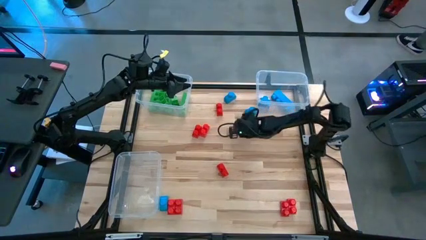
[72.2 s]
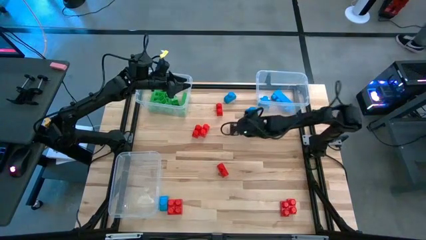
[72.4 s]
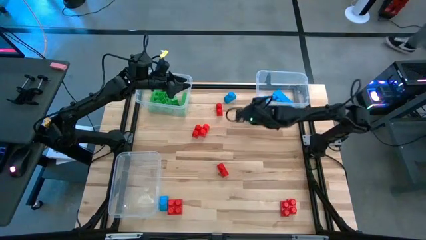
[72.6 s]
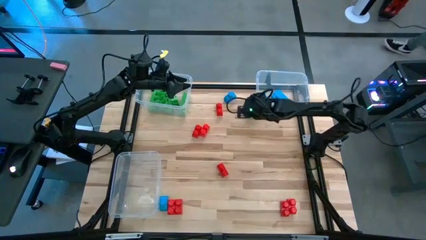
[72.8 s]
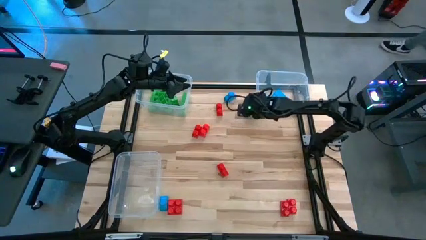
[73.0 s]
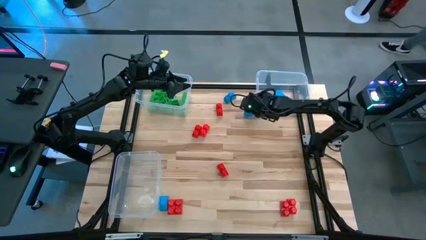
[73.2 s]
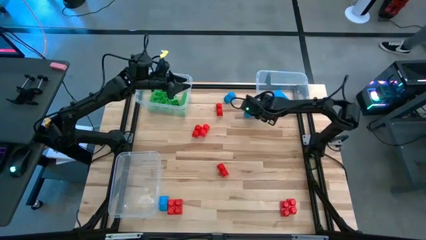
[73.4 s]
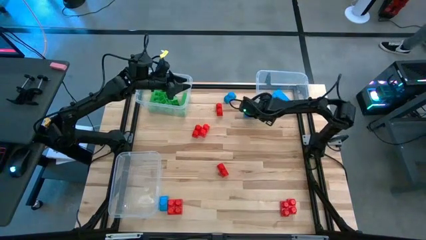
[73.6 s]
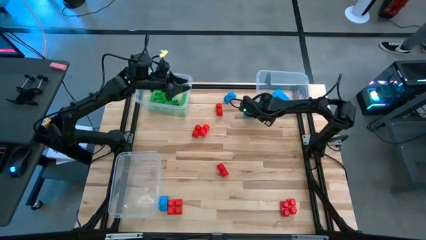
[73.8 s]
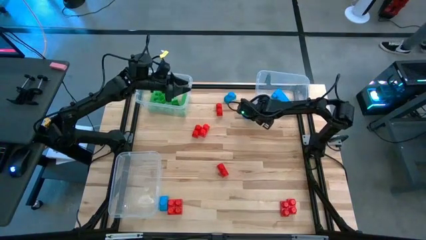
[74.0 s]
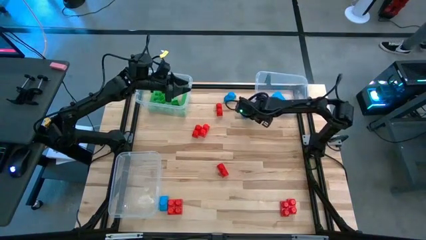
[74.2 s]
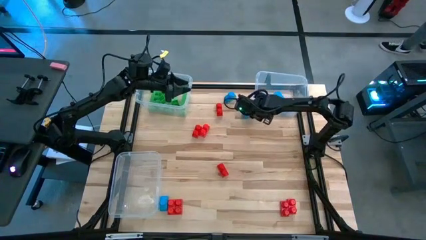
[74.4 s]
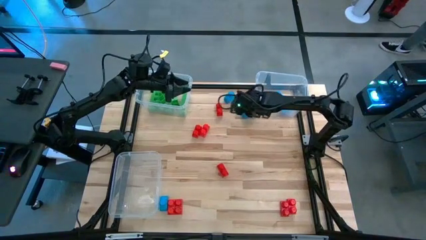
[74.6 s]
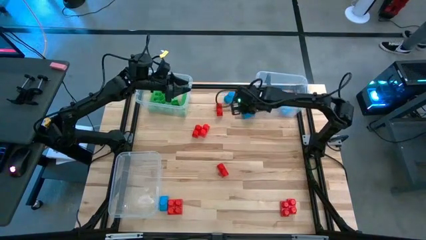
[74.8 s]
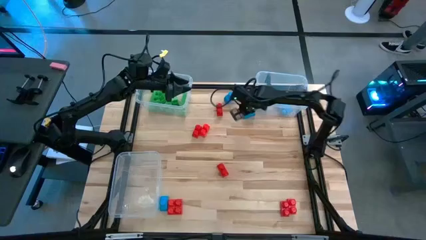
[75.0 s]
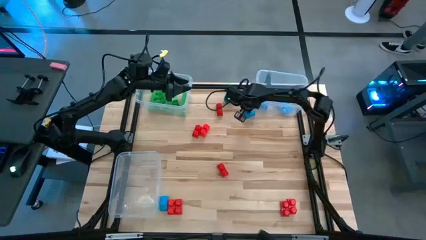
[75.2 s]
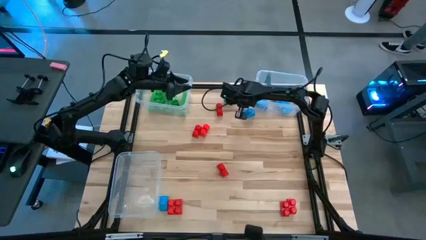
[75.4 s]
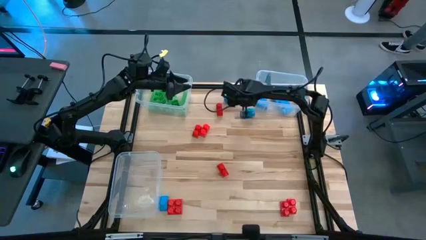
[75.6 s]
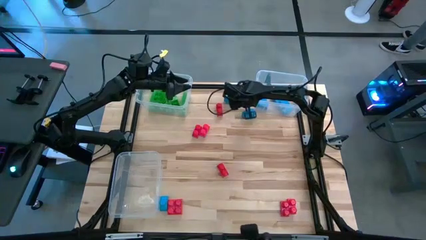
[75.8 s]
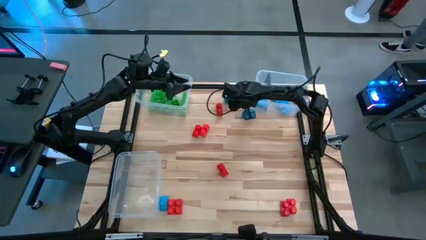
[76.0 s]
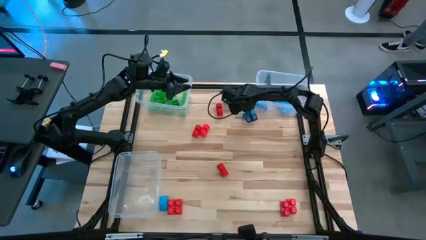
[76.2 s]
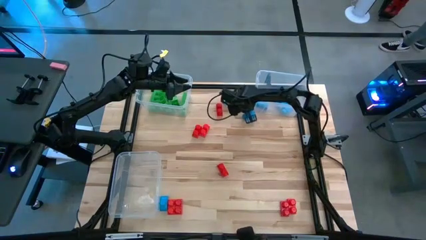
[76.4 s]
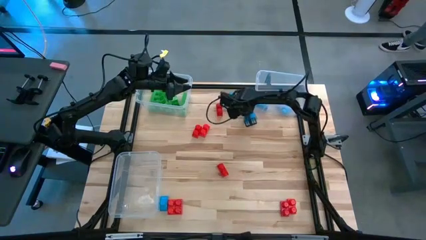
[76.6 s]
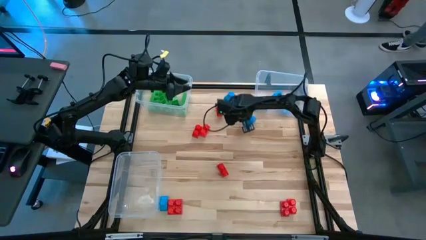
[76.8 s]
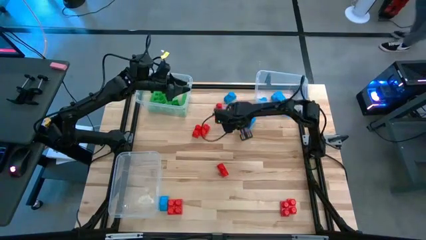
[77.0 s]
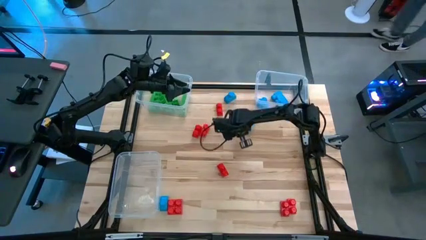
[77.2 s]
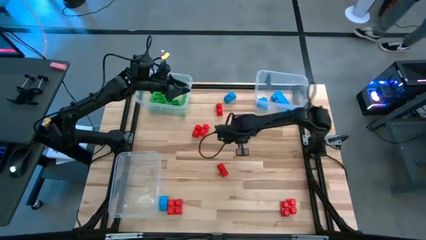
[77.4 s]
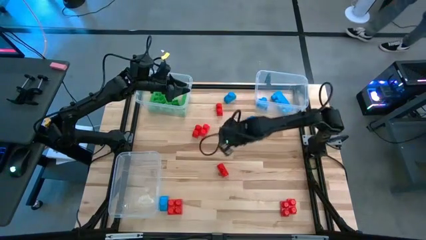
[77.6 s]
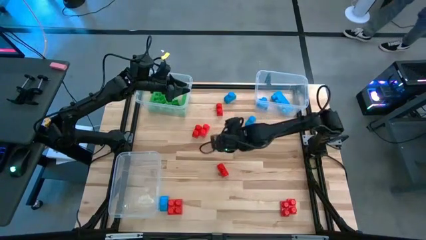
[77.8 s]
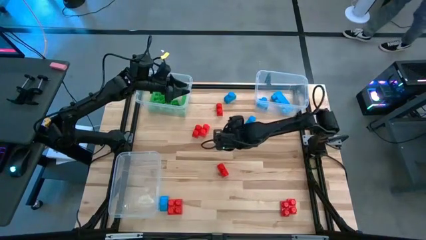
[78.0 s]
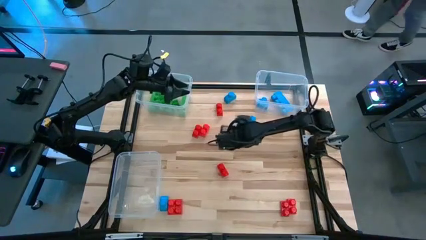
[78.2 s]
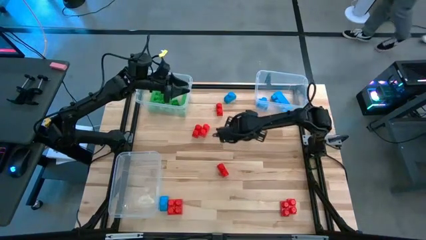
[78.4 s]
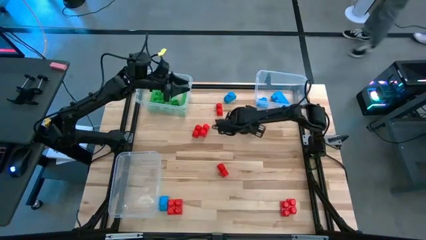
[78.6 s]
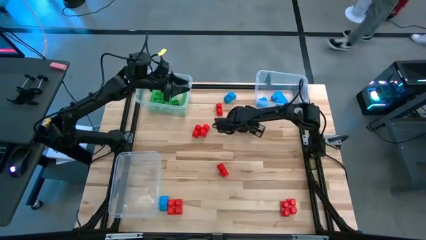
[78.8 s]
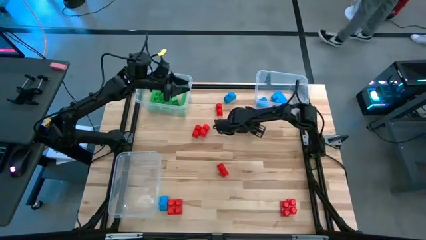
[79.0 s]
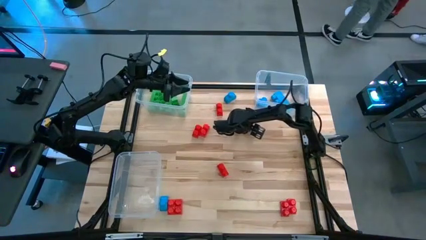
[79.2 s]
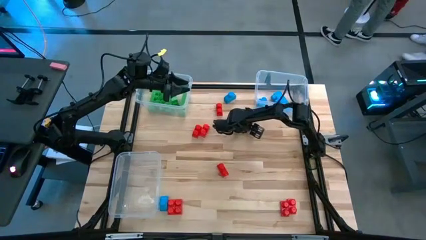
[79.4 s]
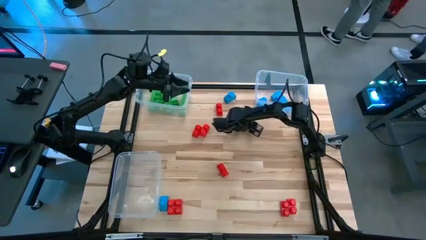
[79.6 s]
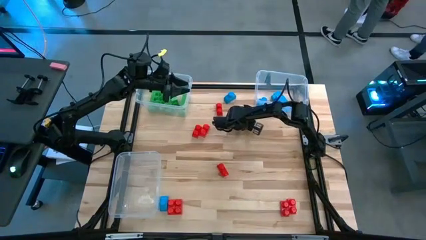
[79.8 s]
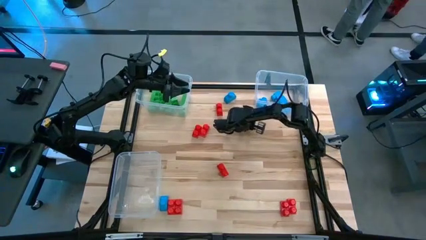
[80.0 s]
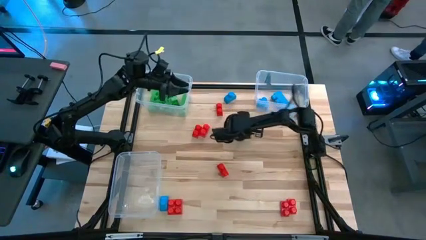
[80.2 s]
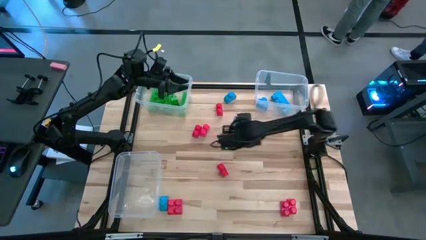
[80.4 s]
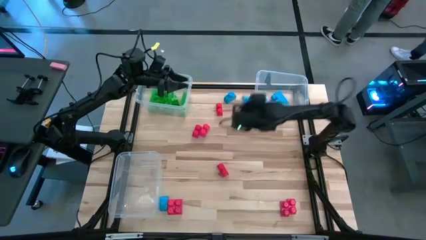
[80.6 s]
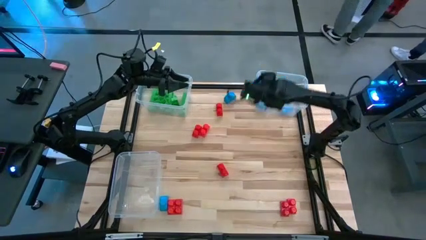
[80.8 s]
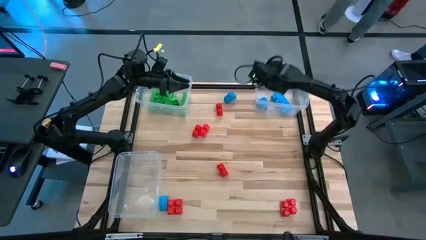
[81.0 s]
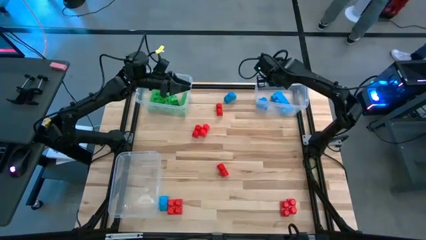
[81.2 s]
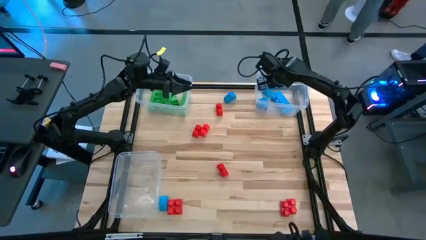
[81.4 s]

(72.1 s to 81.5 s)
Task: Sort blocks
Put the blue game piece into the top right transparent bin

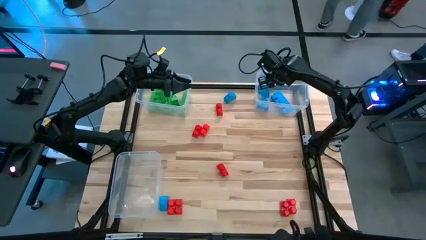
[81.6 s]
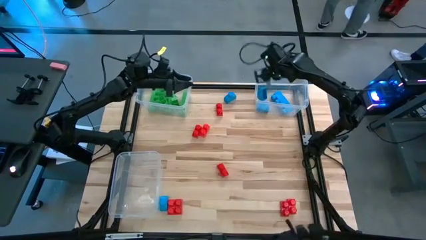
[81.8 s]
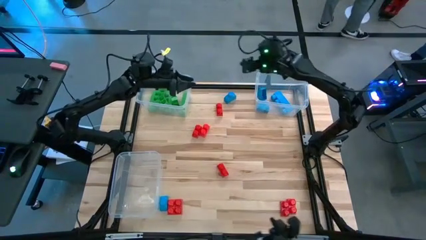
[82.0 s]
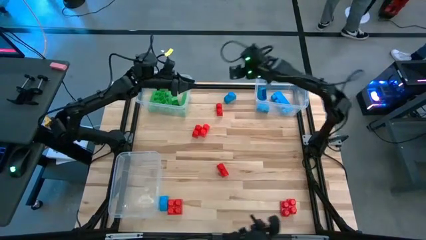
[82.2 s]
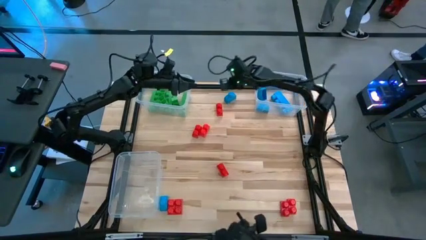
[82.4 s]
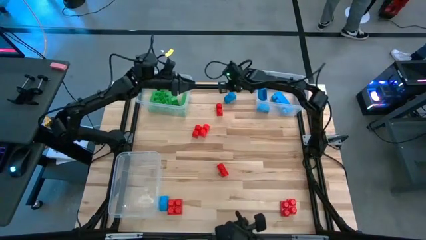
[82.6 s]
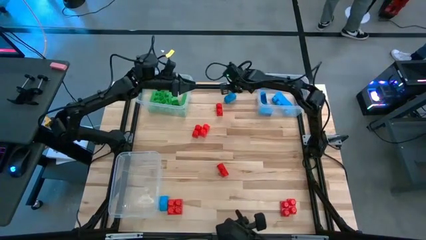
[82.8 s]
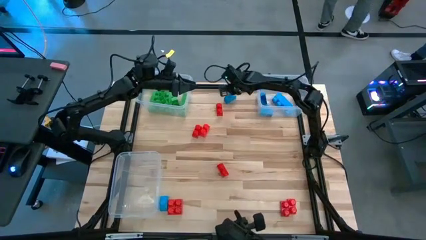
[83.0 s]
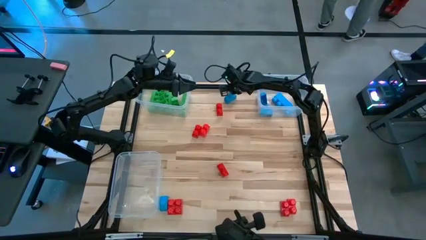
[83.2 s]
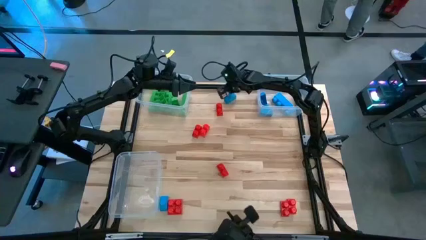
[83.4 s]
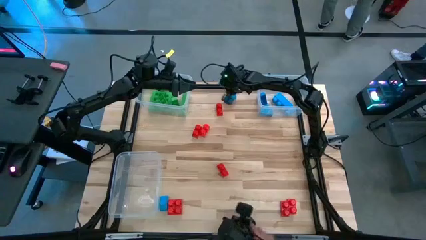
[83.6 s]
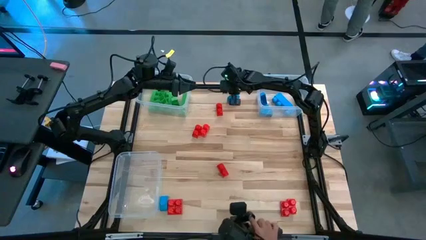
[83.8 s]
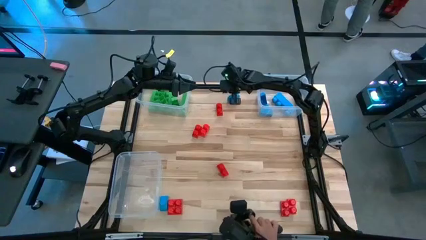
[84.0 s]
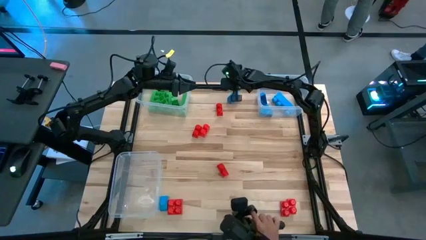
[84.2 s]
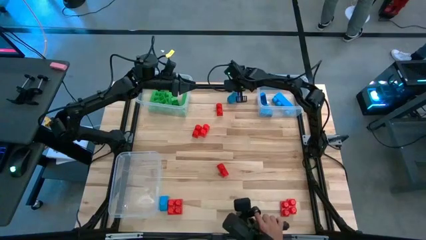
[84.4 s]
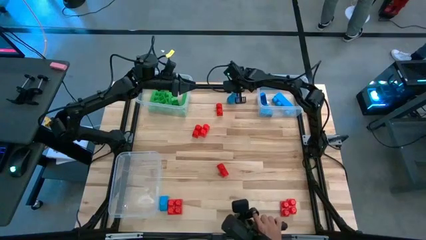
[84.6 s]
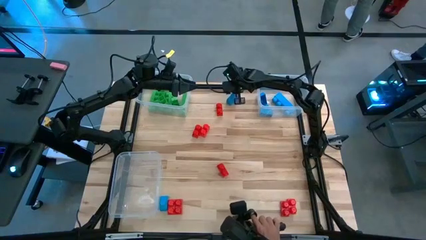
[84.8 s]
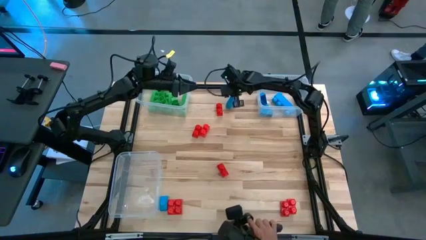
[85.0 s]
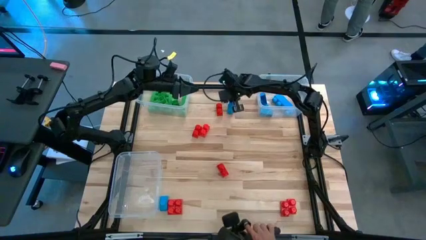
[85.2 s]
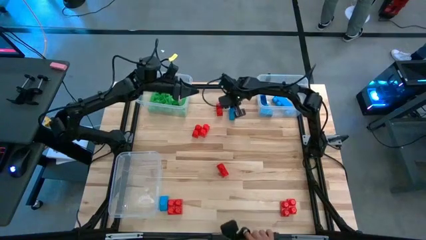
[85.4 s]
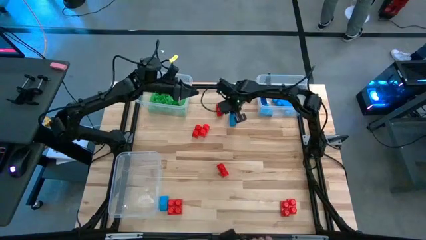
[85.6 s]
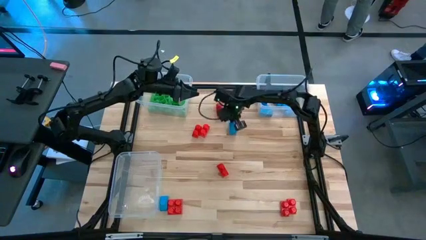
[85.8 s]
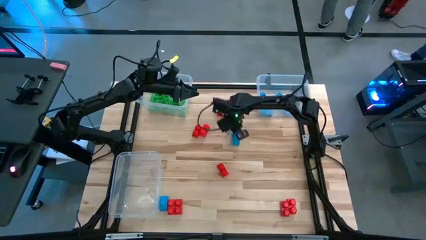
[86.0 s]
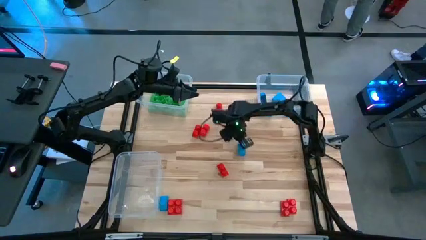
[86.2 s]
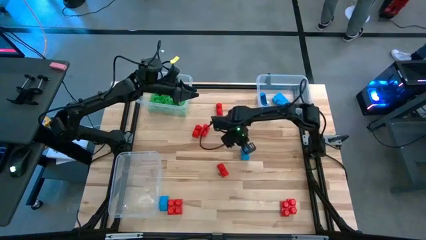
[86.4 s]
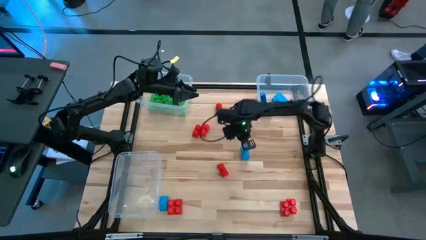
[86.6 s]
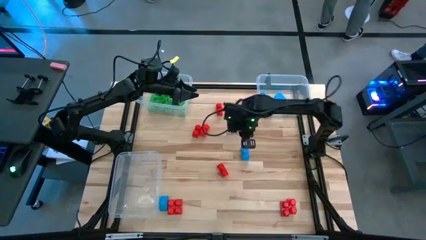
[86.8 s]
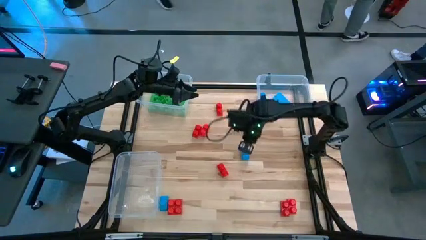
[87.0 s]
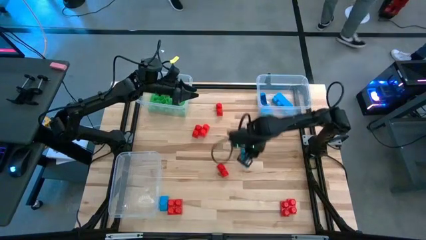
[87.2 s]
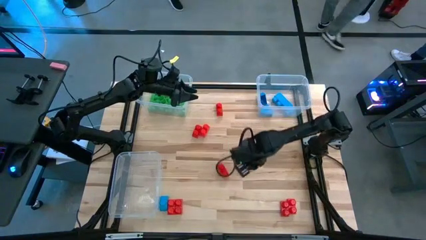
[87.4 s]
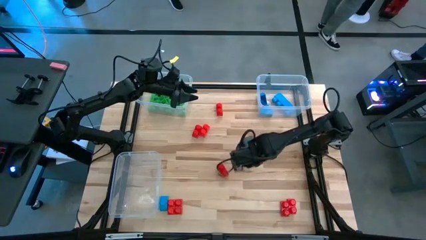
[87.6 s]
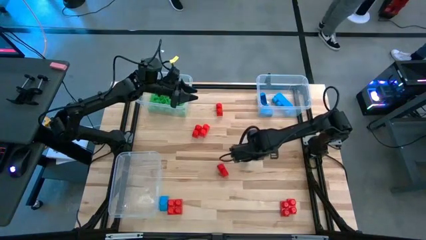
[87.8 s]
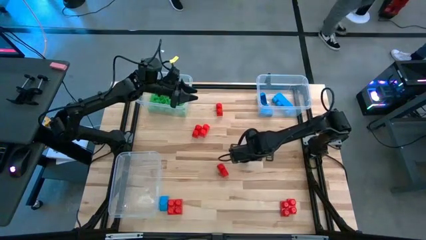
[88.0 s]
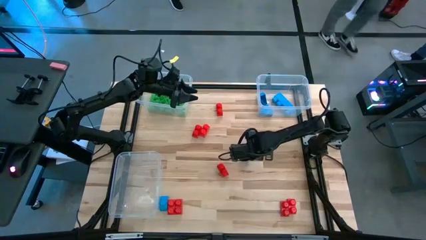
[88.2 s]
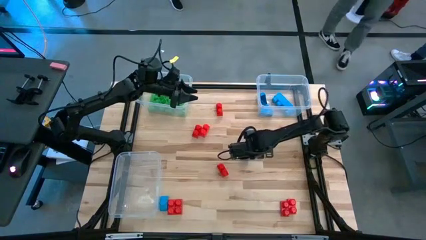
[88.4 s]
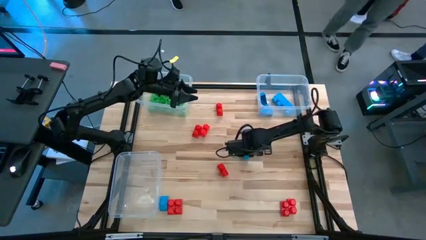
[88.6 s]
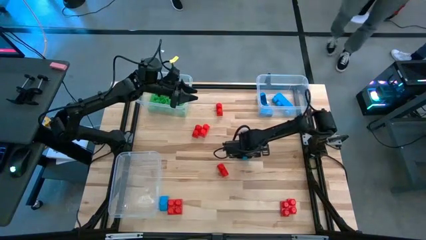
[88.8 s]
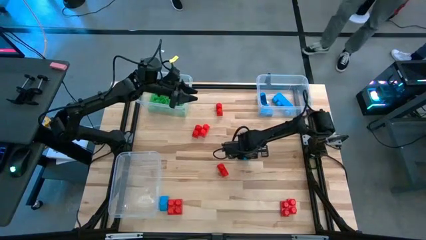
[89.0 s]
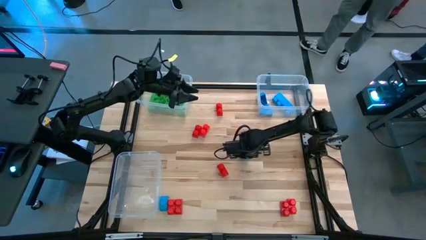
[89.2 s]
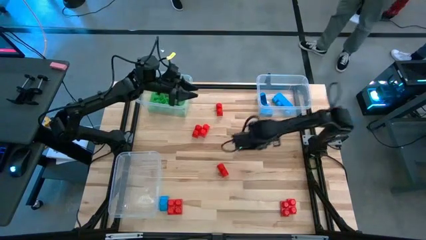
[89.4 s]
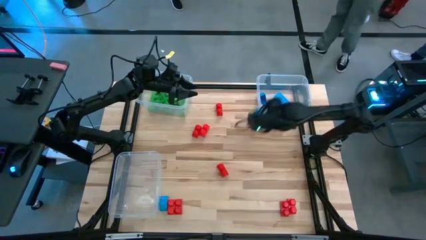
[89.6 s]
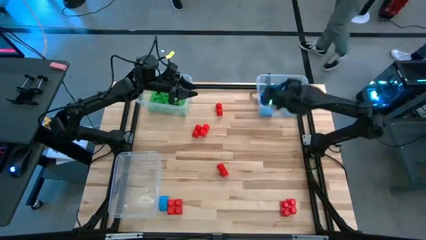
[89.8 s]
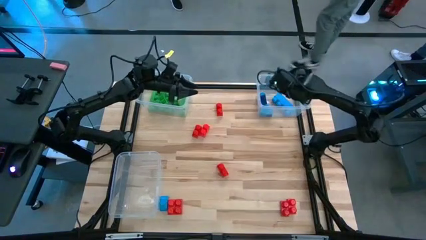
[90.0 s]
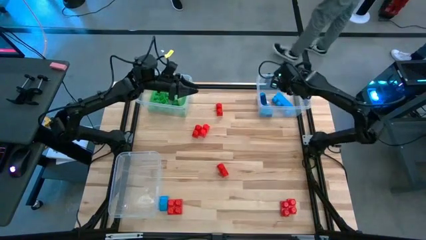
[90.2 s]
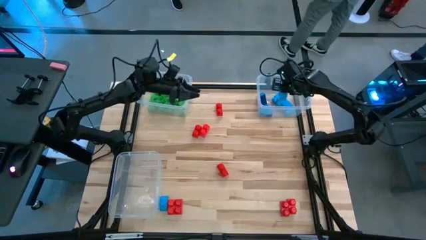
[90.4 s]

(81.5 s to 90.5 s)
Put the blue game piece into the top right transparent bin
